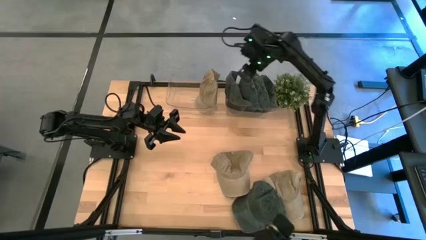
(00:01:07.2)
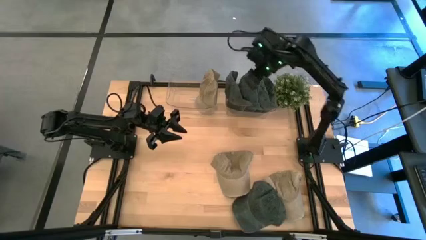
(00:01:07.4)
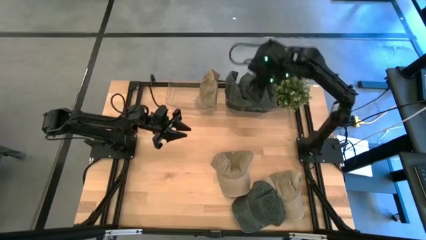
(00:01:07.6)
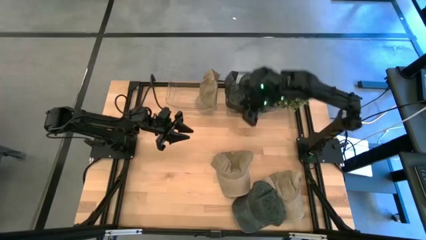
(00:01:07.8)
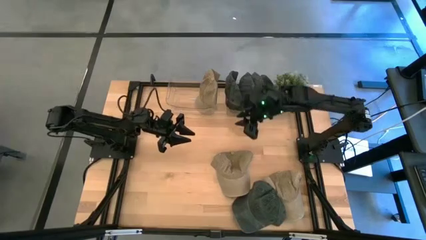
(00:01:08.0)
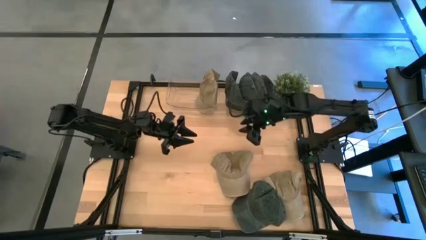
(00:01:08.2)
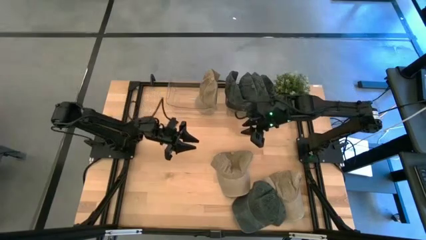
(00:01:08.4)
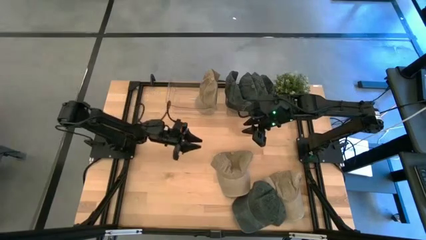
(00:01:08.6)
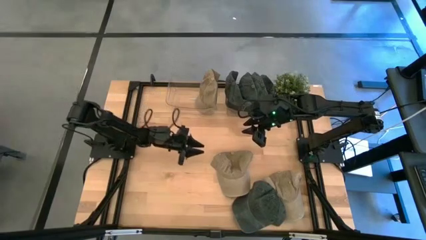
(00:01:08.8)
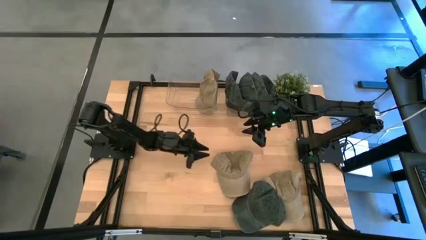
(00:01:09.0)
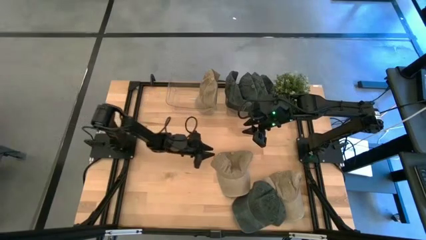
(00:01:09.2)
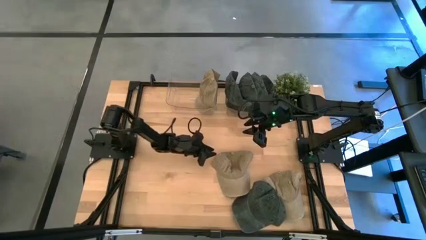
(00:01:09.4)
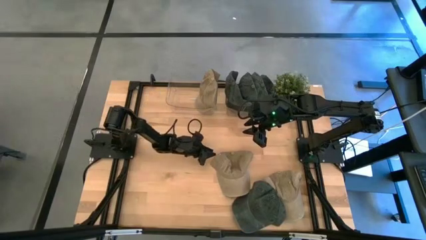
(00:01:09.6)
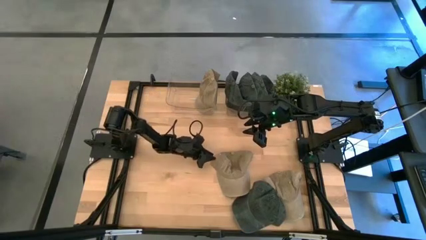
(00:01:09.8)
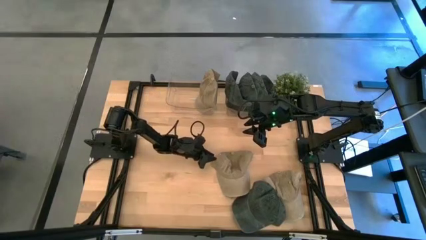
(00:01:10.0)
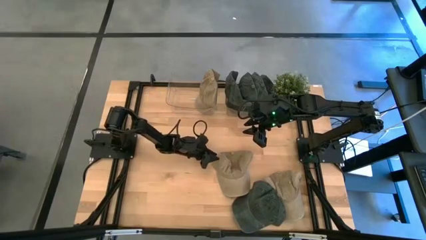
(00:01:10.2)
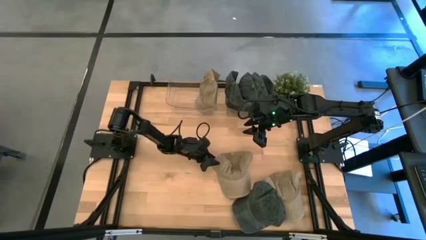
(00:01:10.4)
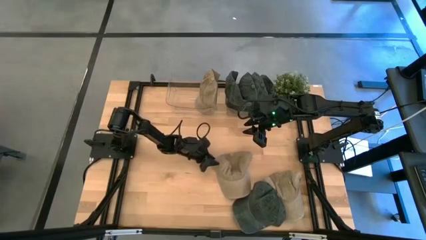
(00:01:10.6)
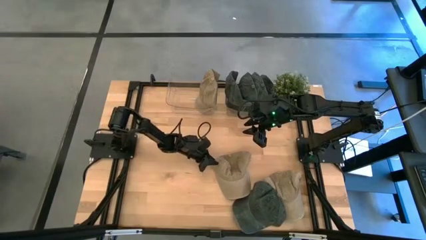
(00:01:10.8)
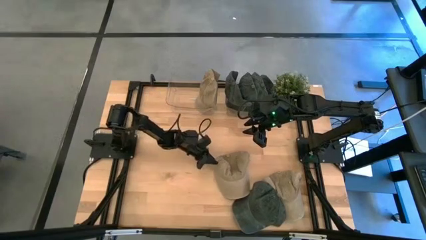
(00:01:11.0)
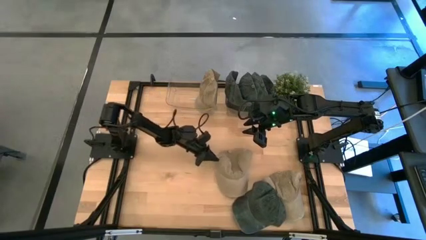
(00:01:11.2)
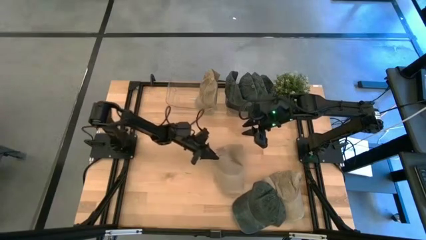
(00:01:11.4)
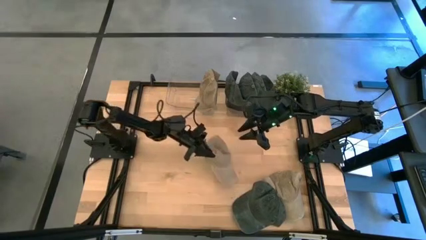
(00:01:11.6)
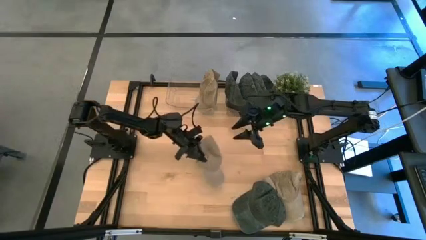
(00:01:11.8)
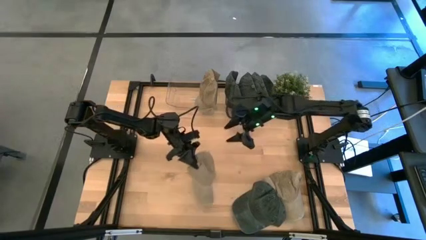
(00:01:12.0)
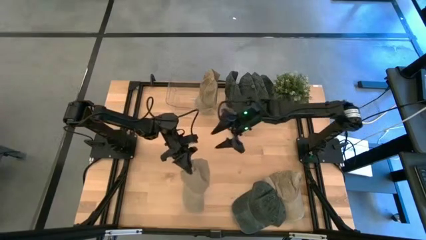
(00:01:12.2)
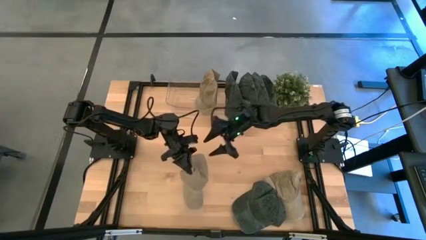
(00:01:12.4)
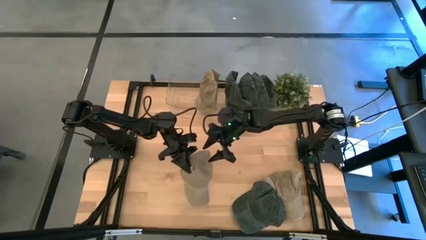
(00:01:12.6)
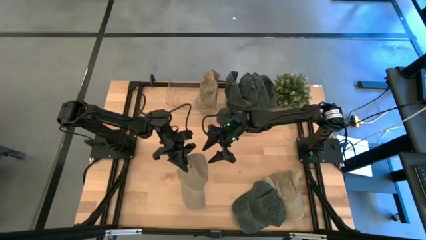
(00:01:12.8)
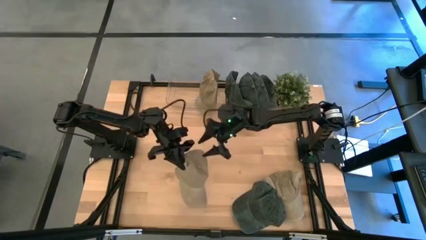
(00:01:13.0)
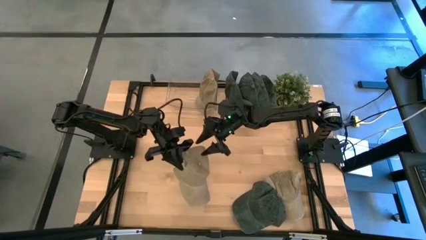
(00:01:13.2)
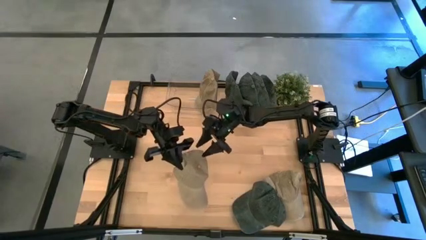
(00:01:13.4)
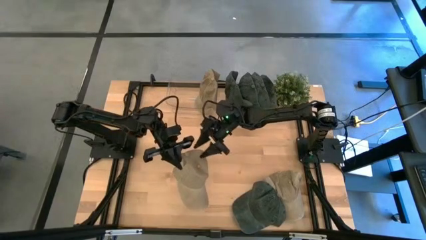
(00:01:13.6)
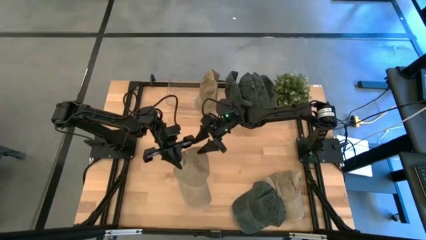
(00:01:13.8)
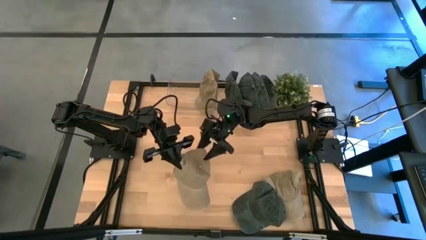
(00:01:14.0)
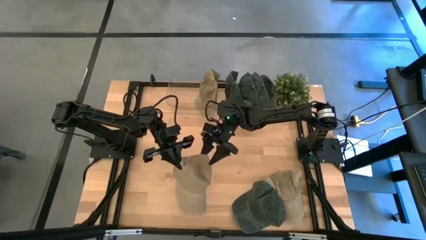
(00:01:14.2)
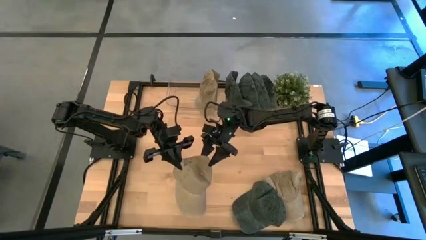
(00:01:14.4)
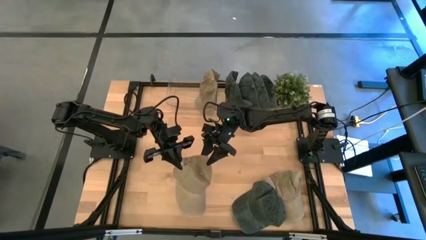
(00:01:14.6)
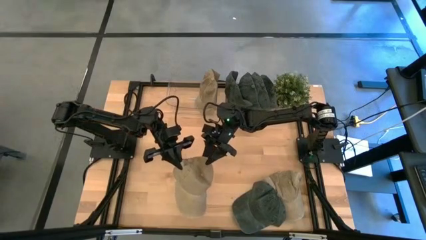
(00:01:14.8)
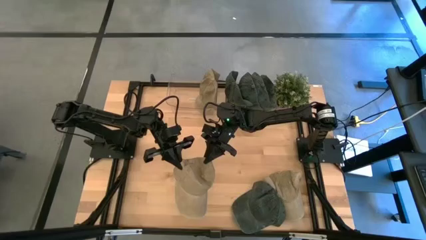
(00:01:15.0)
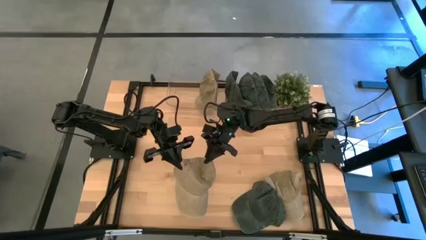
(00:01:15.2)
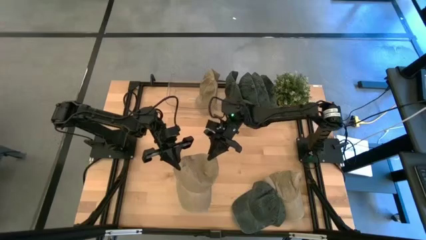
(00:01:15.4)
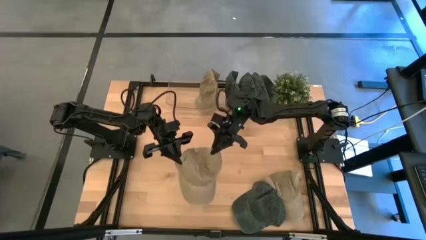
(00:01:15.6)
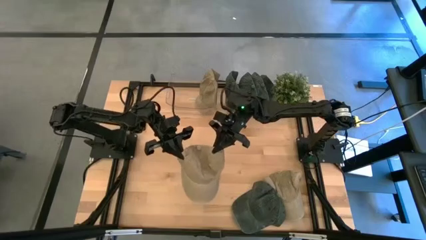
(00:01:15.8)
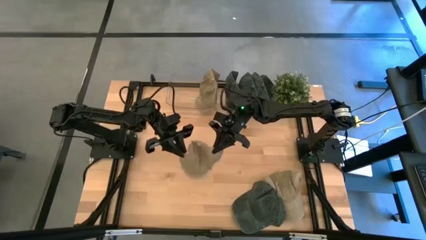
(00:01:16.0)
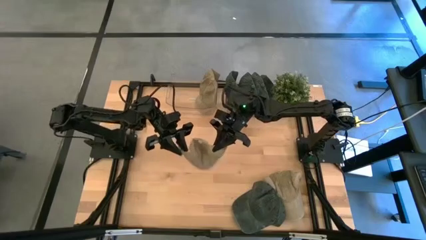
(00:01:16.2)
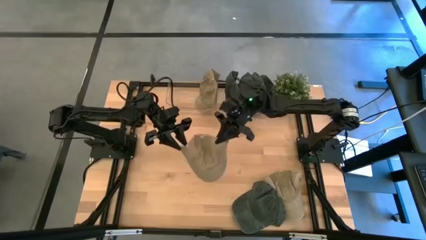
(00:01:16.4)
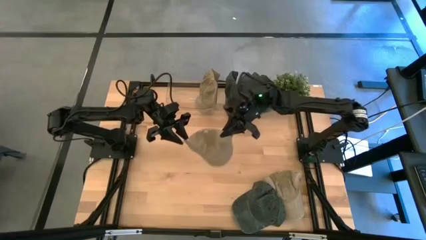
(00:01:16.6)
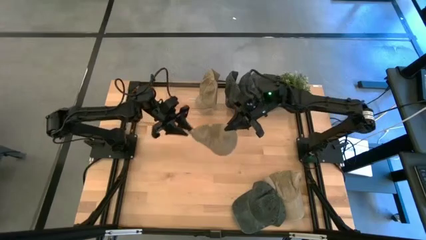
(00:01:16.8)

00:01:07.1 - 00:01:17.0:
Task: Pick & Place hat
Put the brown cap into the left transparent bin

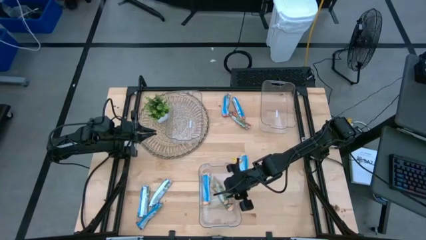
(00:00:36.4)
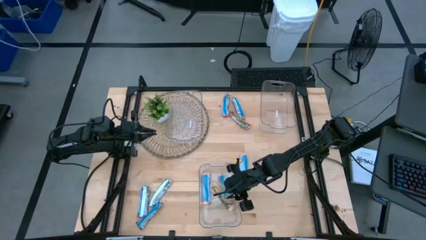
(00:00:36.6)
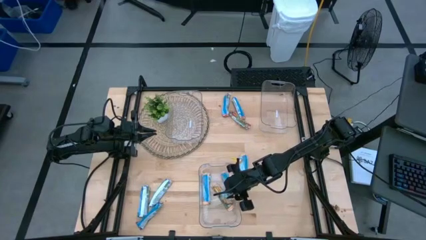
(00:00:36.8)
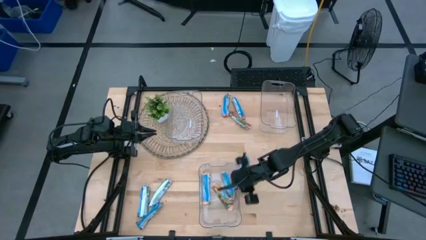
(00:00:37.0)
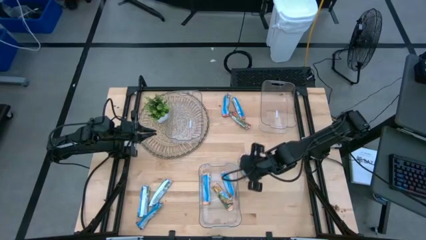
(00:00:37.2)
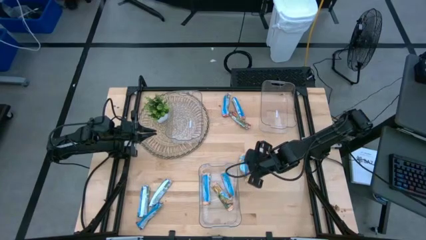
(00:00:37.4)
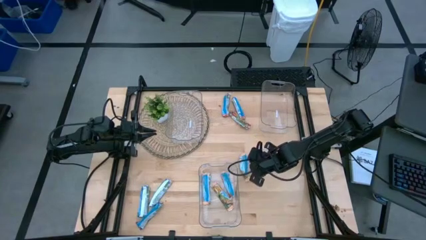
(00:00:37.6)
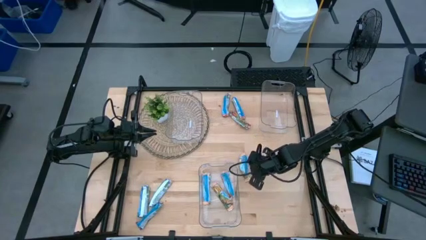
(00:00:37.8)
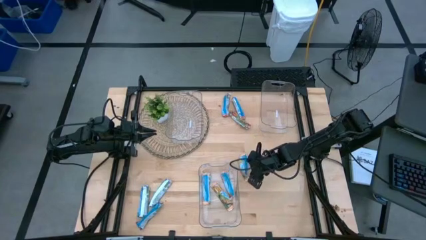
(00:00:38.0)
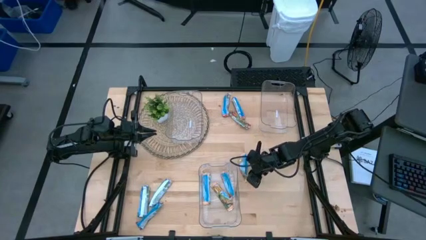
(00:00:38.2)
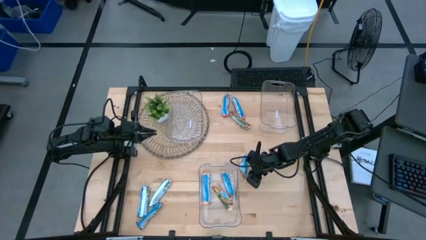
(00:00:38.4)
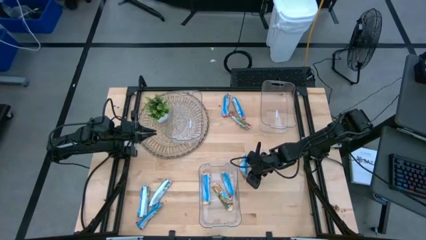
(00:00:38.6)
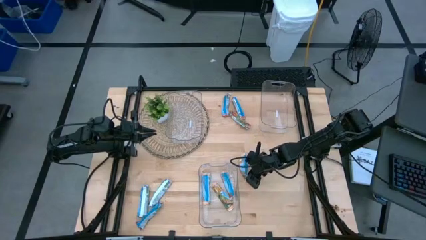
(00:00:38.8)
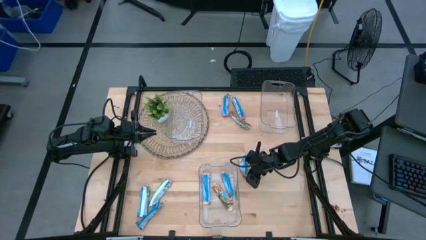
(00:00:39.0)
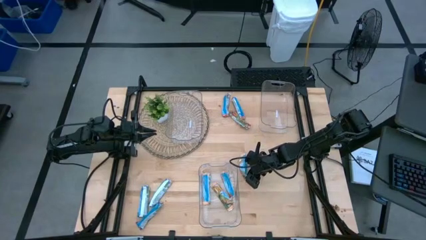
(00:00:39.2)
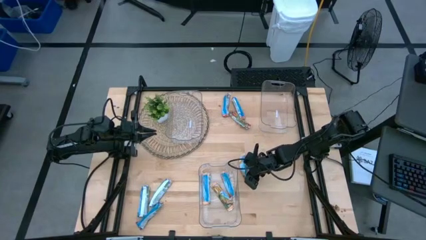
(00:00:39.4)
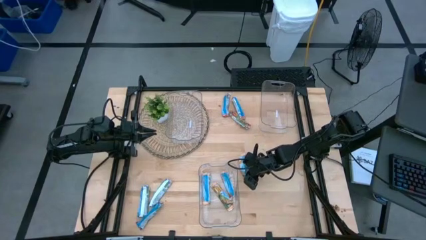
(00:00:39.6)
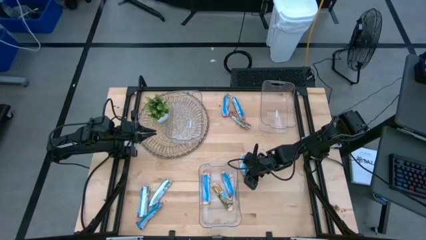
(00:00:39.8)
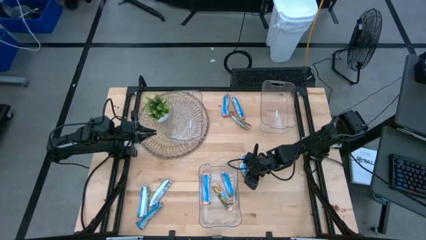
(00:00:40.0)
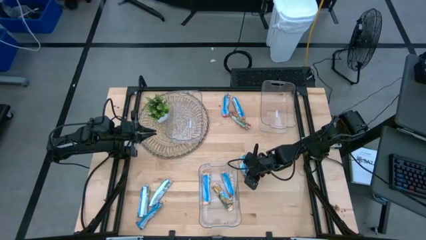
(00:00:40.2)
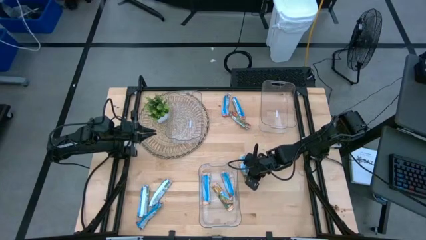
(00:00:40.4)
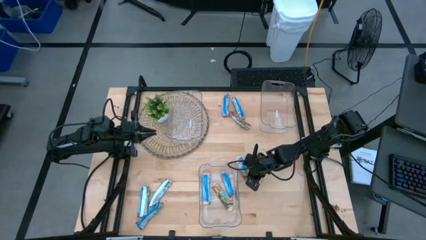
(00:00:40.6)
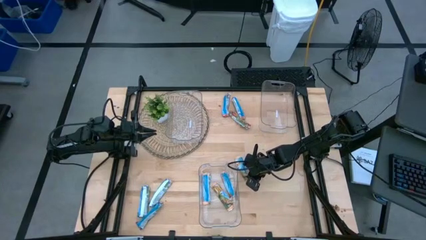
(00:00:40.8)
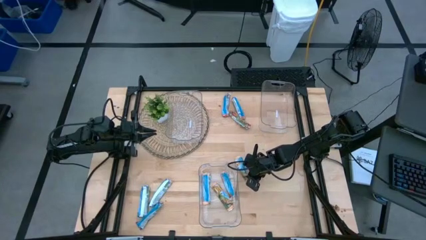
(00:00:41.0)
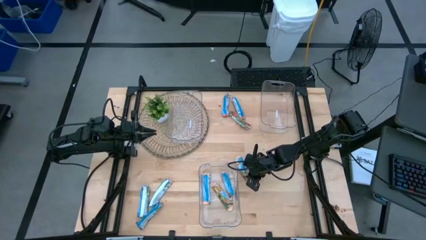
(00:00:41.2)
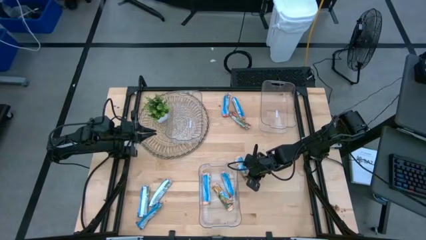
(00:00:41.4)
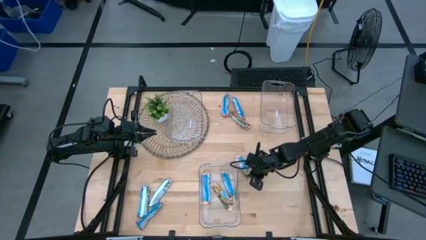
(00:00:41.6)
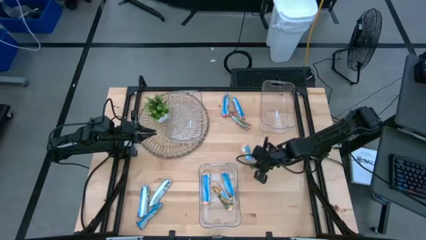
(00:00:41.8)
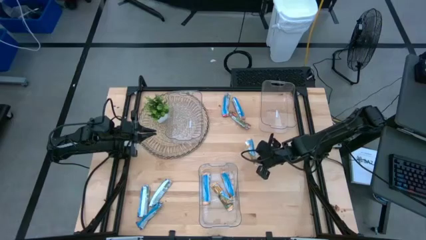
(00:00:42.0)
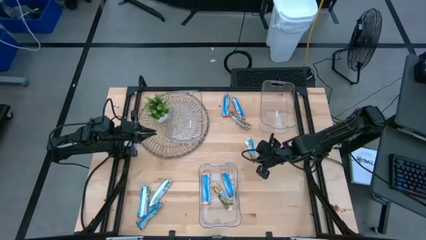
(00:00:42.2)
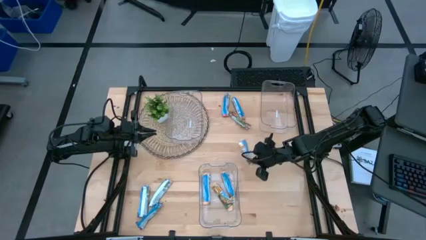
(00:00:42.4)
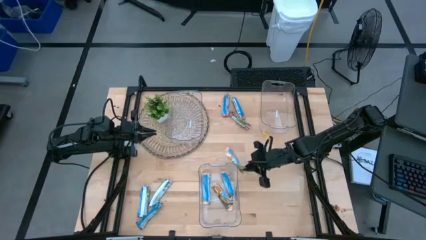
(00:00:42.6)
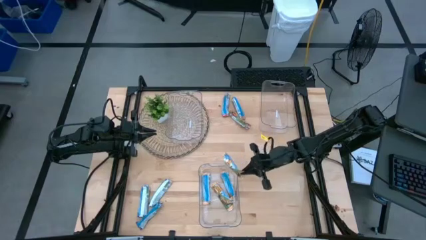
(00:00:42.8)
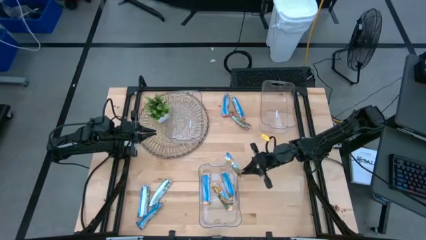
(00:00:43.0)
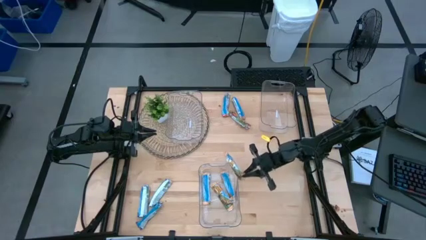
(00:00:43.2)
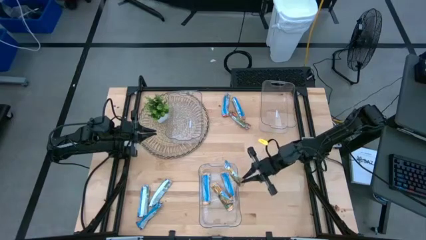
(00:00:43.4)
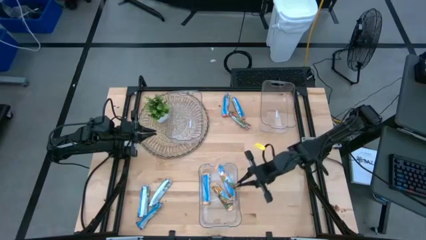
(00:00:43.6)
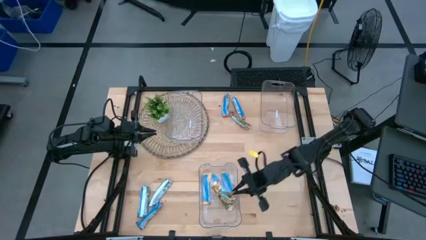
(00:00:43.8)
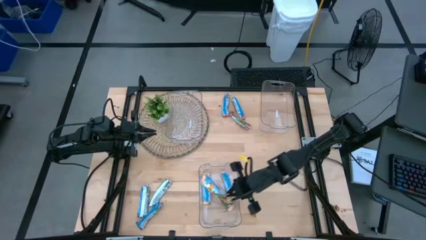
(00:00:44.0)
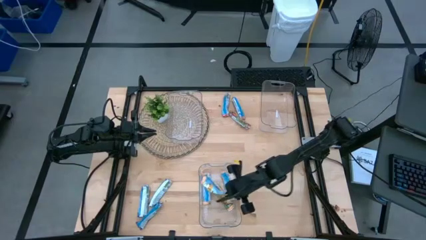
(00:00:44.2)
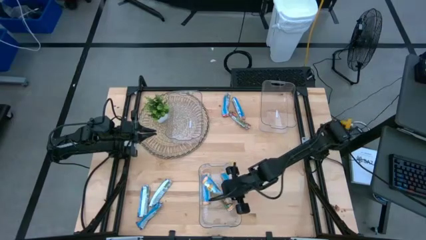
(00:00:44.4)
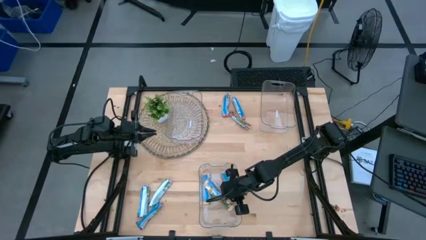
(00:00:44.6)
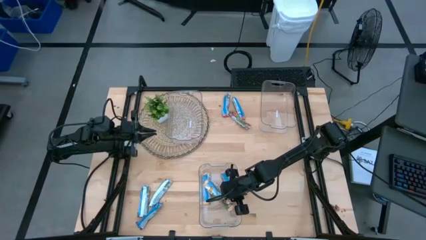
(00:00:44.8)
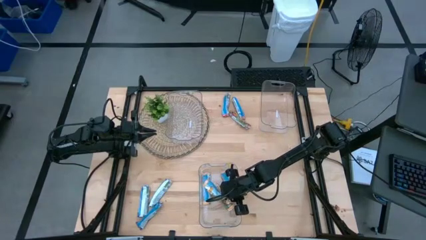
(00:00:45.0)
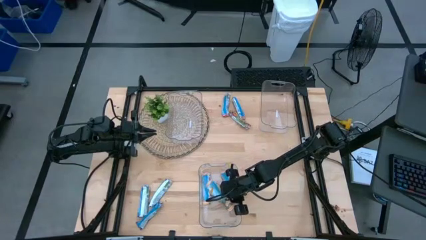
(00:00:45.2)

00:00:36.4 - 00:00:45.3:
Task: Pick and place Granola Bars by type
Put the yellow granola bar into the bottom transparent bin
